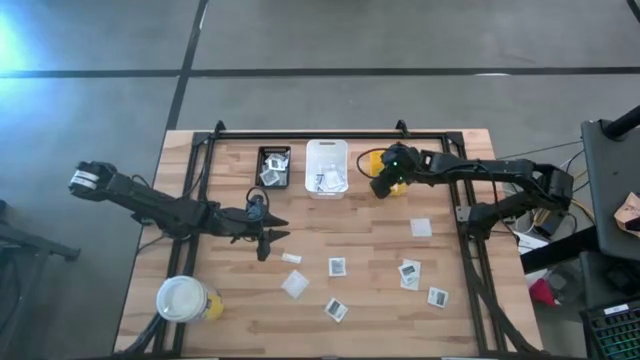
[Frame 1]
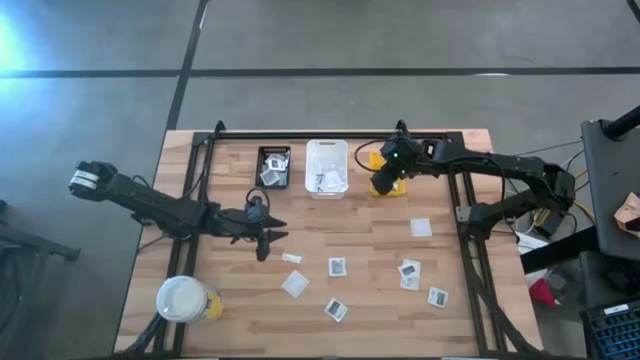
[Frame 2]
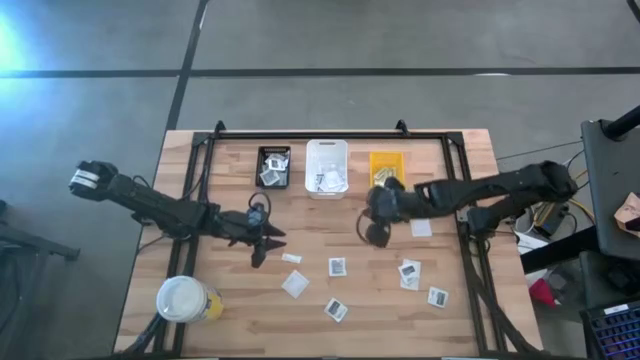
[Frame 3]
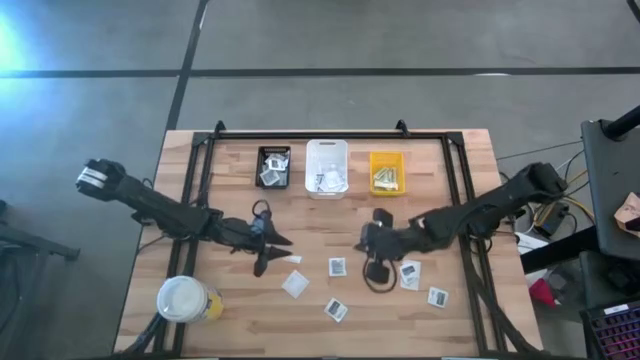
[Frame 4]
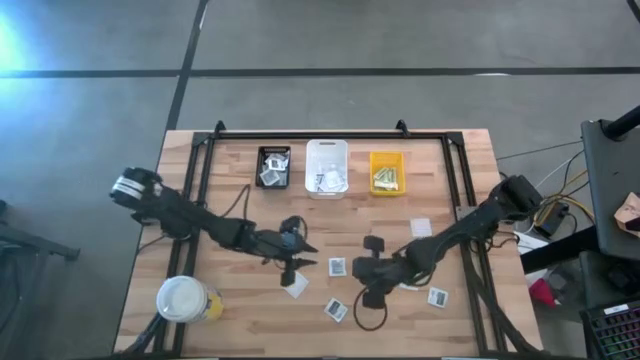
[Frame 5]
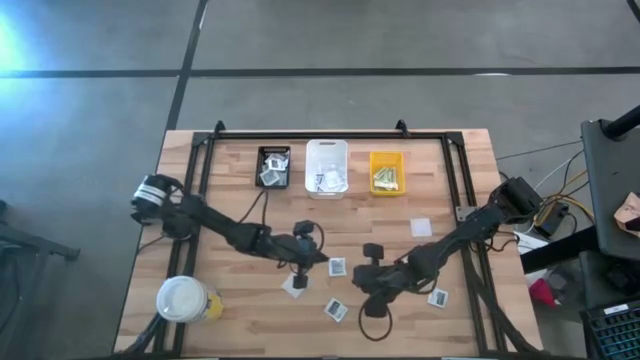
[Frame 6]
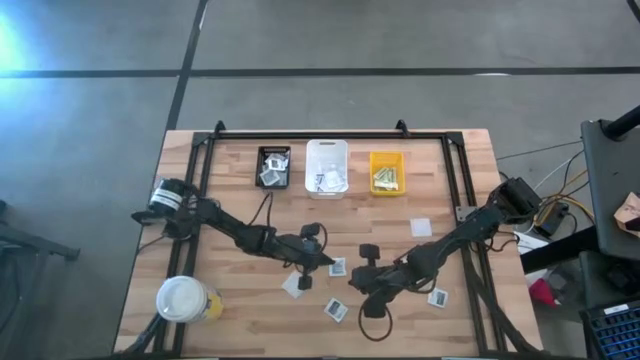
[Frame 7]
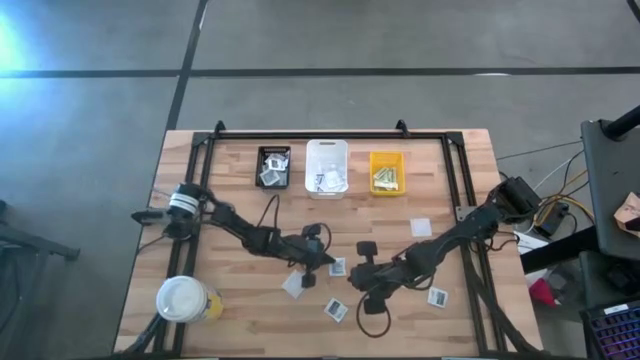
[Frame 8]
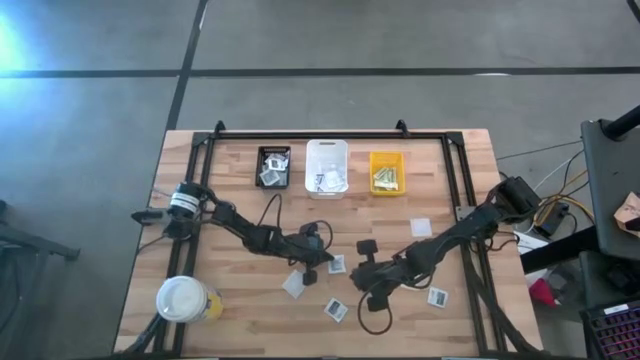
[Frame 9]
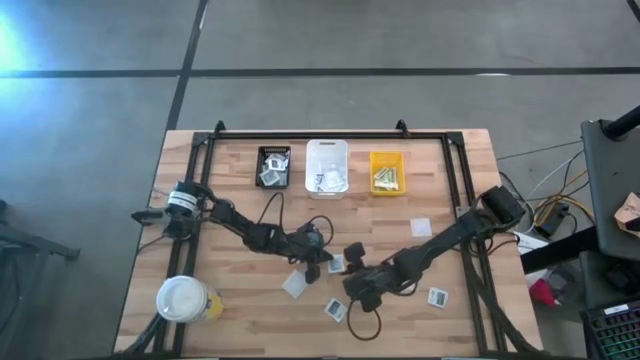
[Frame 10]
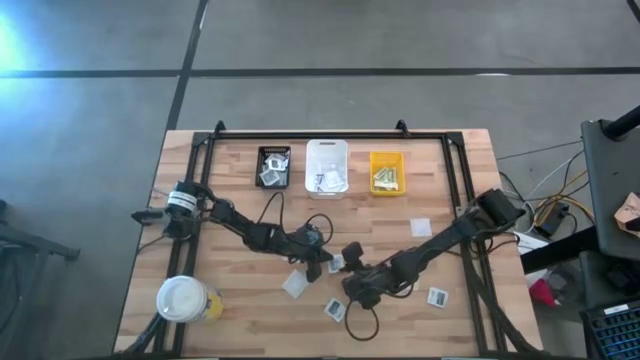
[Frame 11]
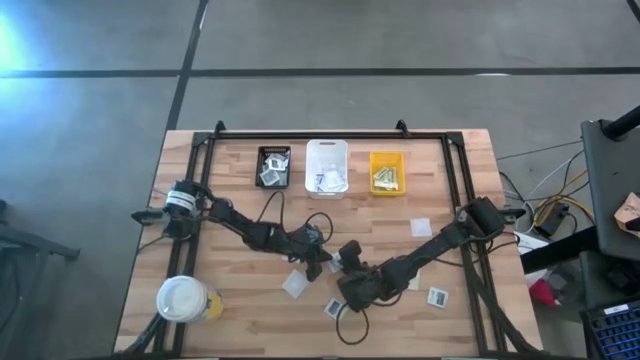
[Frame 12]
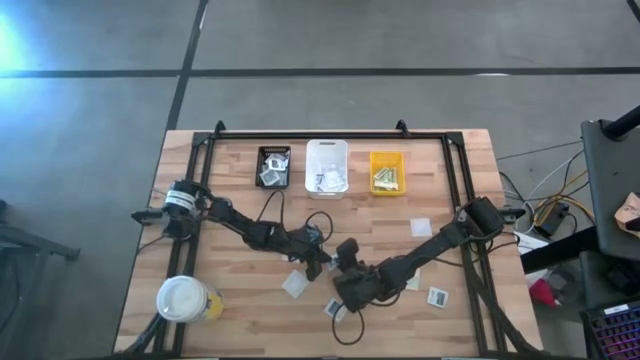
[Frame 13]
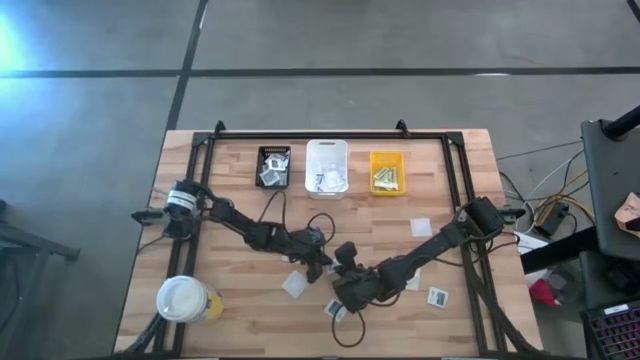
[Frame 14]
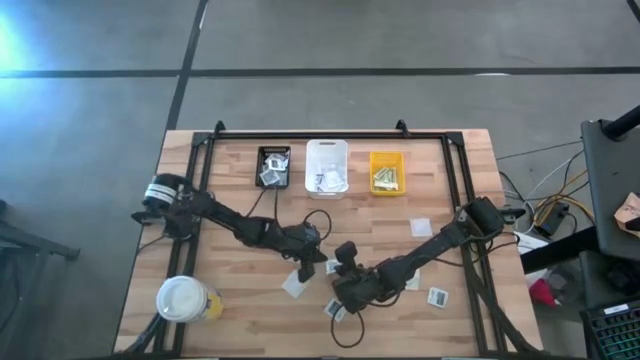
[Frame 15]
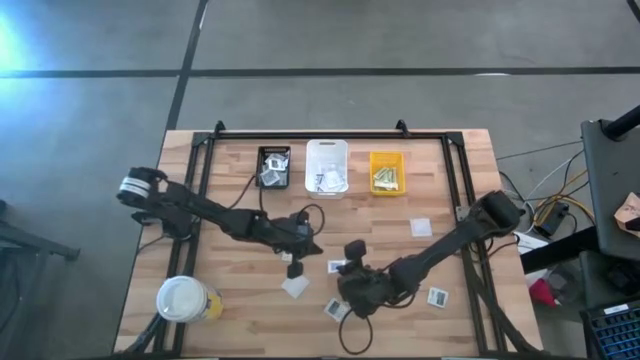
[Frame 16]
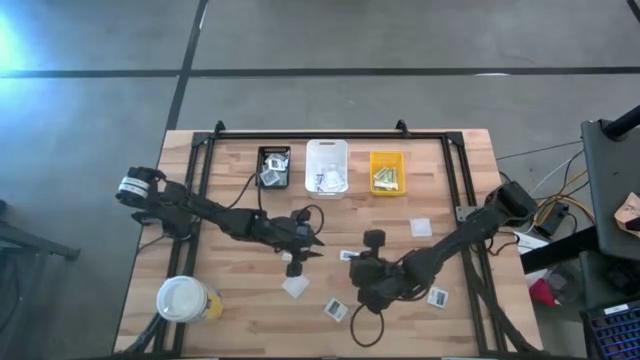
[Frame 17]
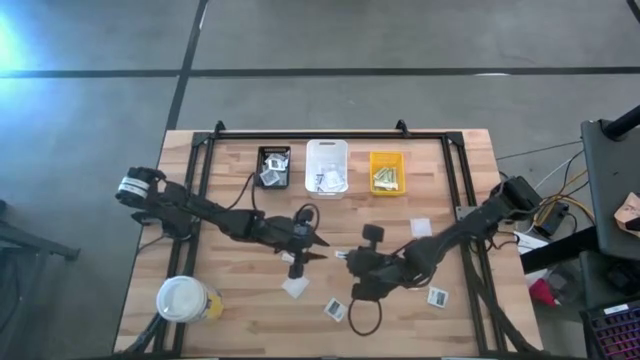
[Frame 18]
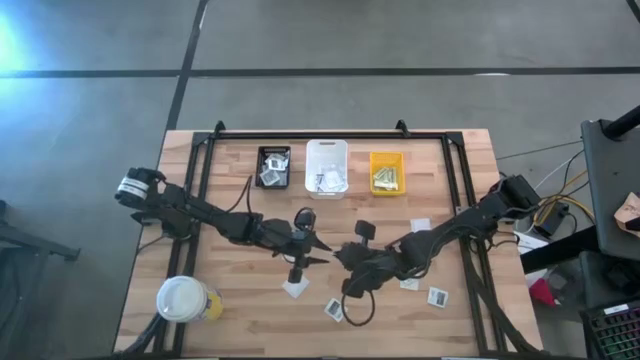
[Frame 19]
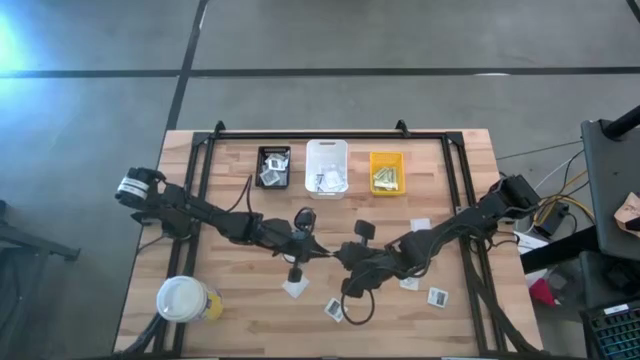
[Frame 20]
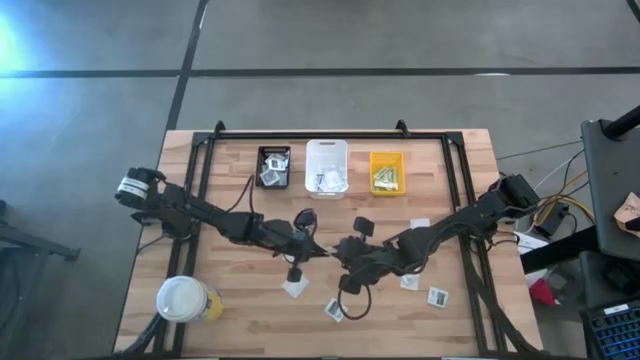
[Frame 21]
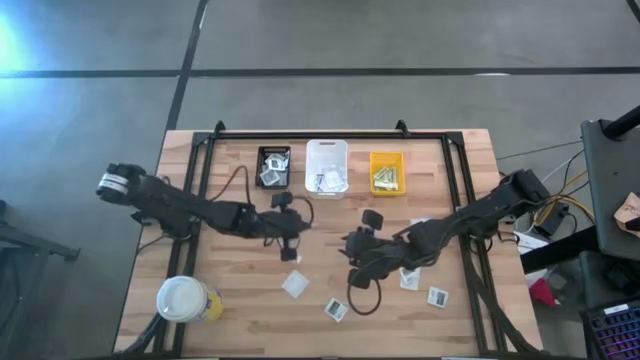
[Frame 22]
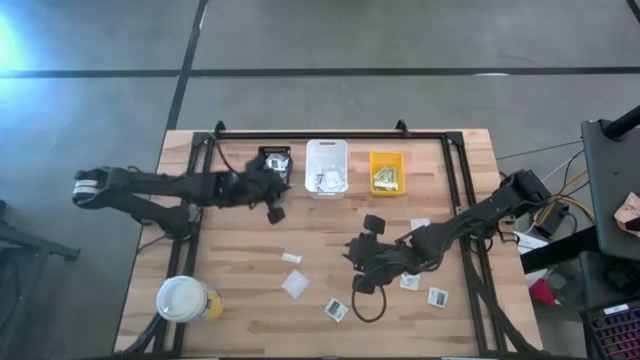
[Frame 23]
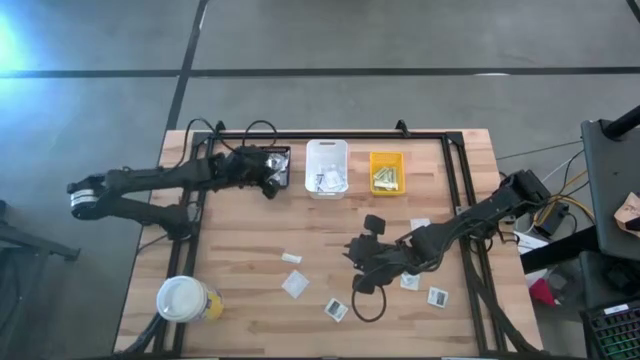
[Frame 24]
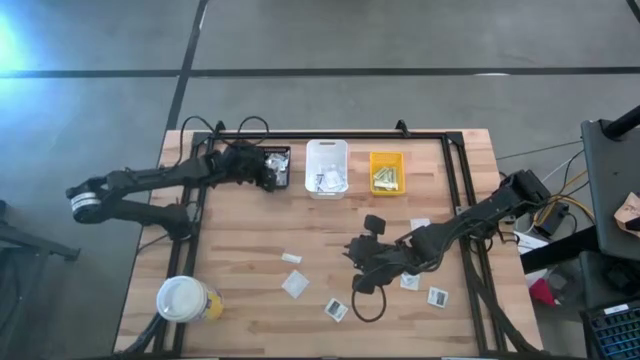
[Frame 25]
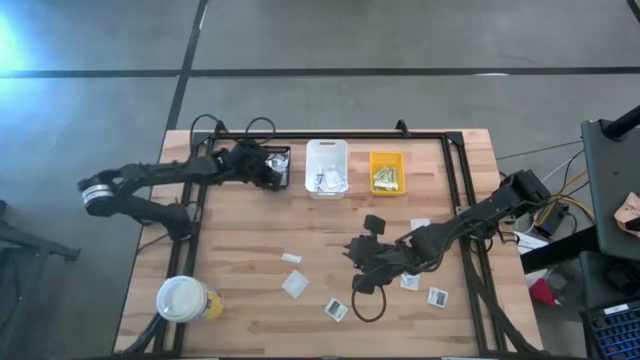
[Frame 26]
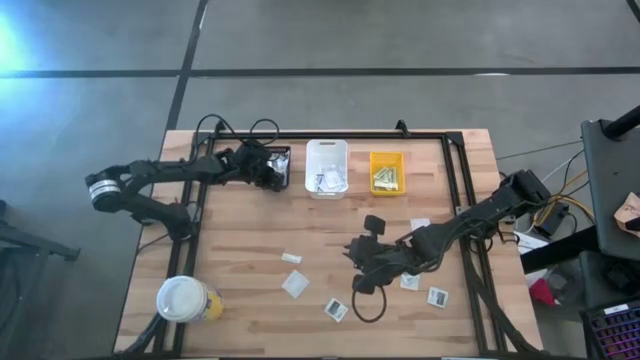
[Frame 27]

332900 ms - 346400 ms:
Task: Pick & Place First Aid Supplies
Put the towelette pack into the black basket

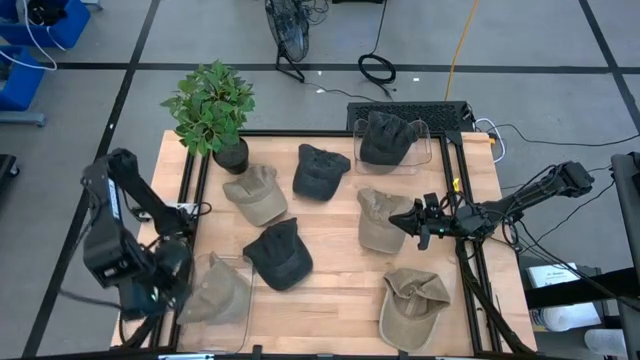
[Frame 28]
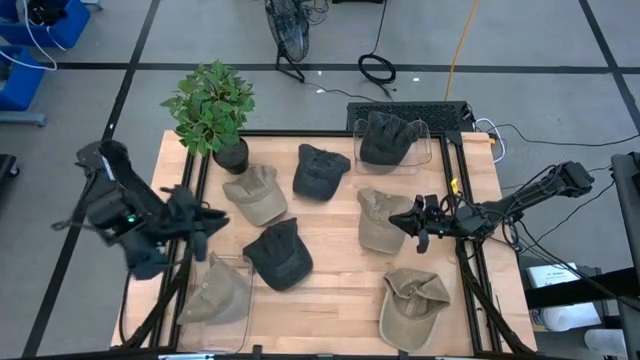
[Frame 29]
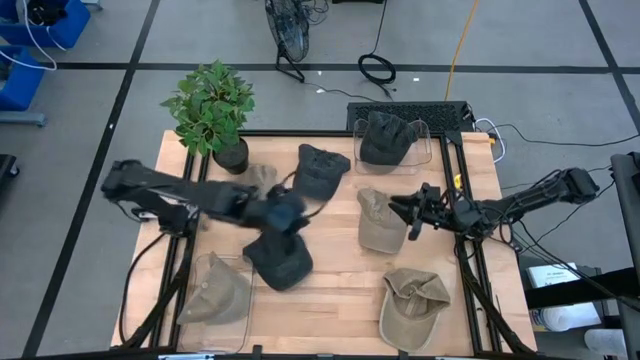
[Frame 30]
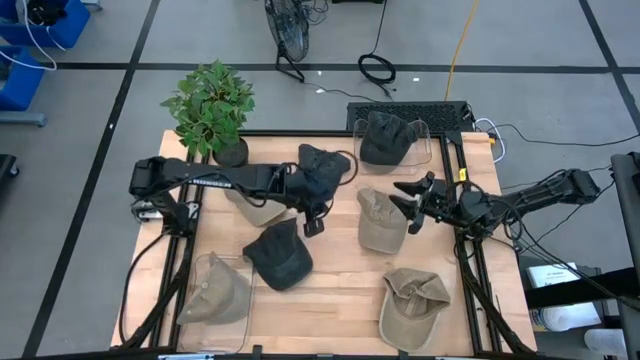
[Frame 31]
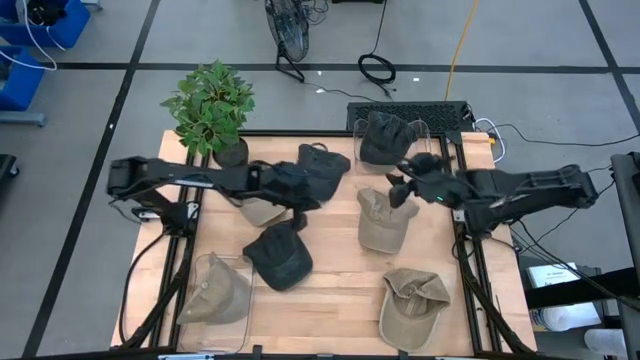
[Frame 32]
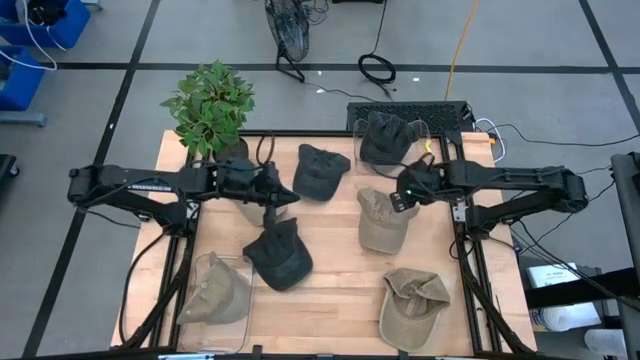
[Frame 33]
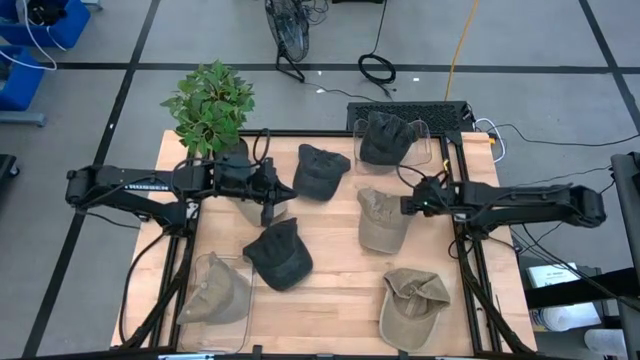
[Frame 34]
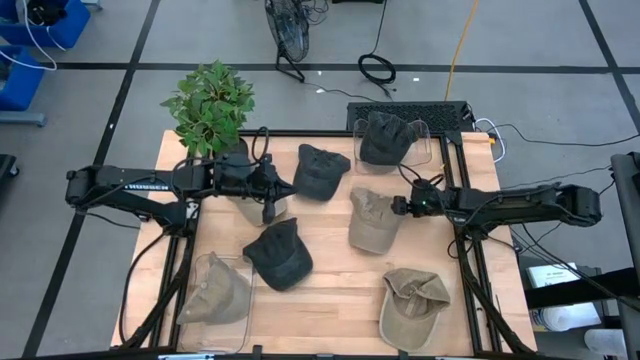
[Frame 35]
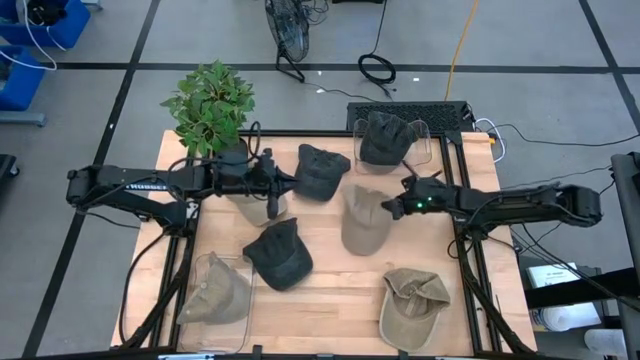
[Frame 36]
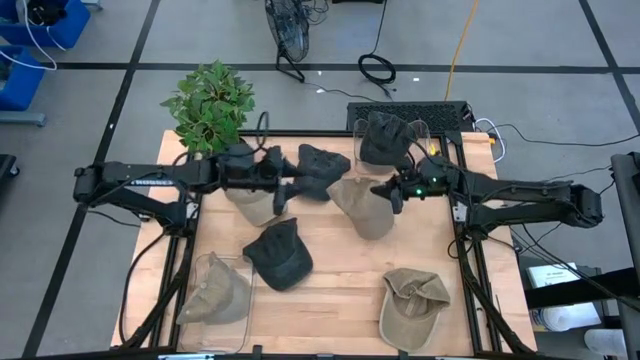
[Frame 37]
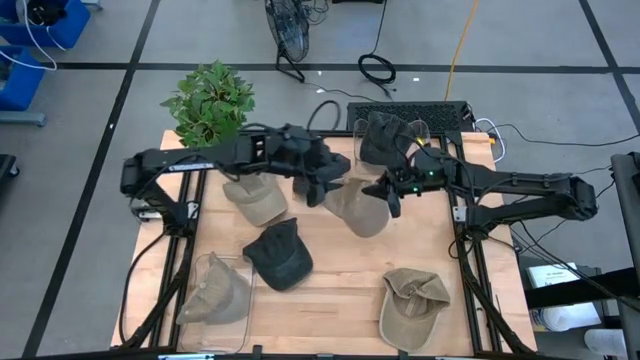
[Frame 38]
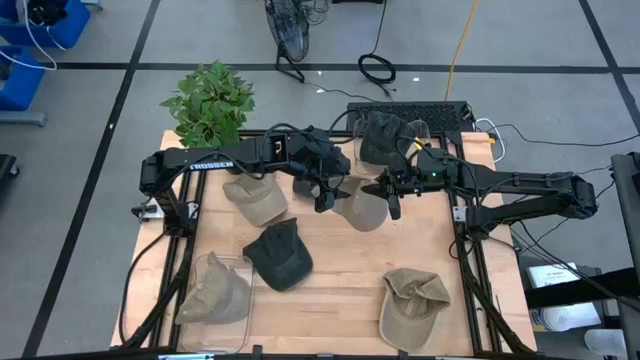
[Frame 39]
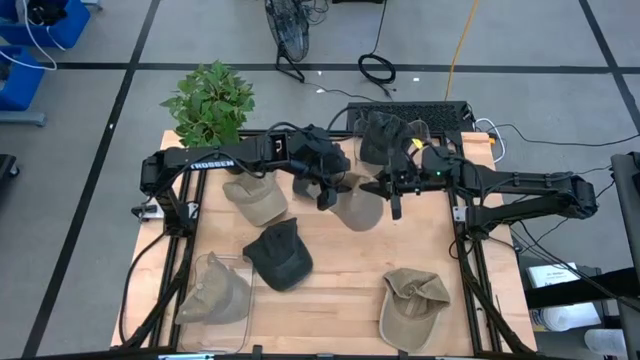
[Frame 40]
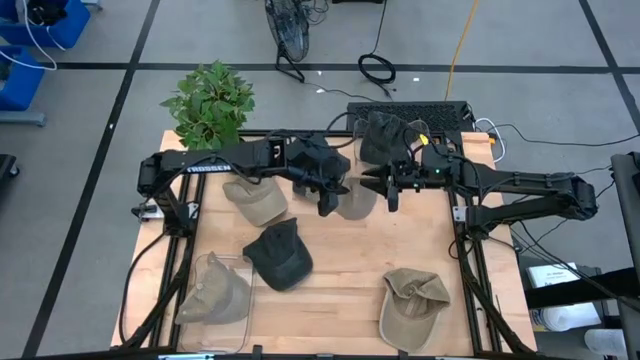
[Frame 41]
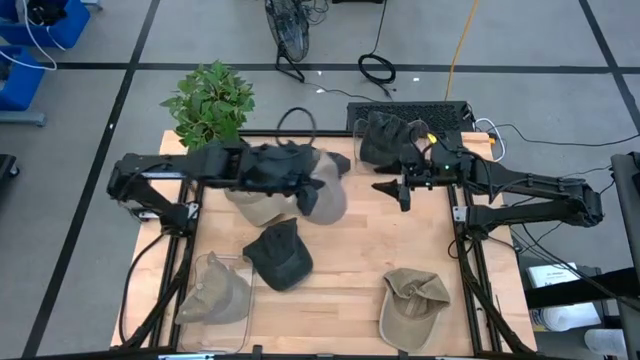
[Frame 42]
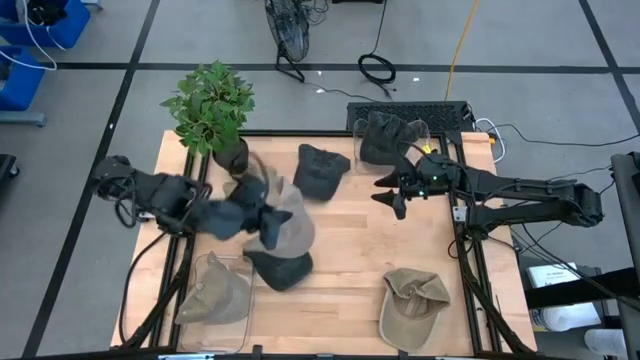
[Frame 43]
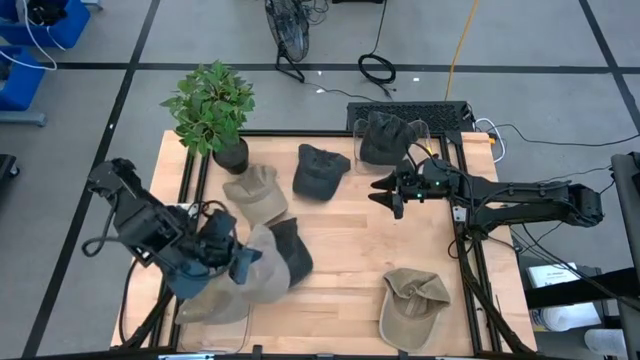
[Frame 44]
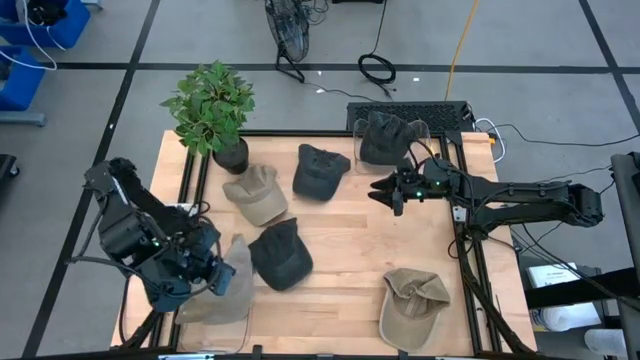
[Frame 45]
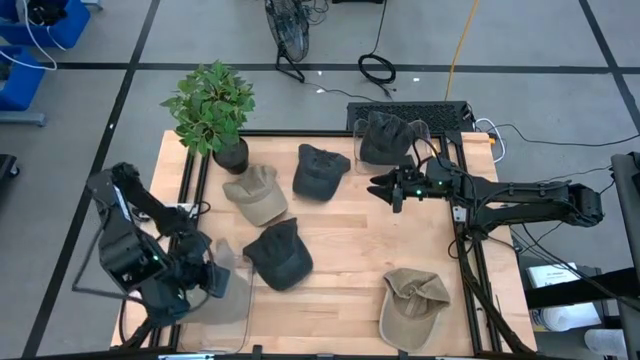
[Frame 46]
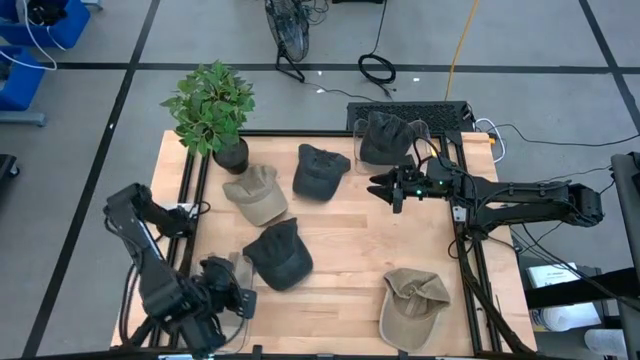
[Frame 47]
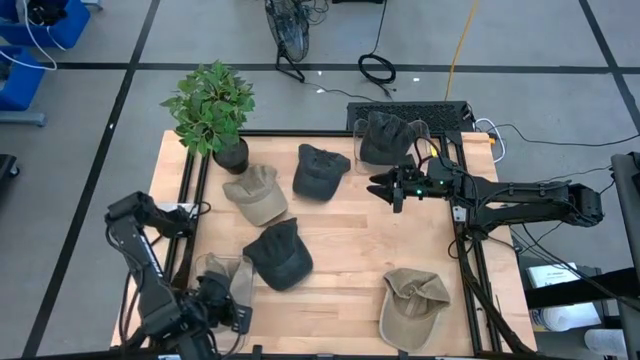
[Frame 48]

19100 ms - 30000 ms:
Task: Pick & Place hat
Put the brown cap into the bottom transparent bin
